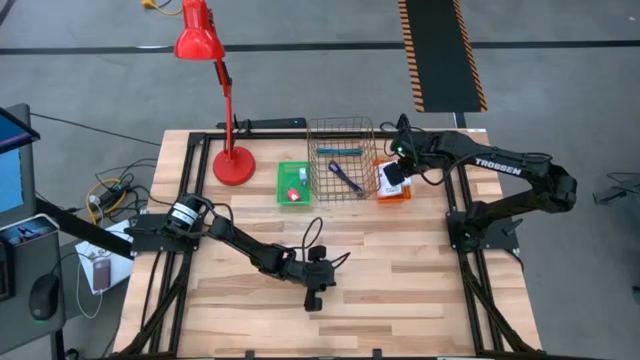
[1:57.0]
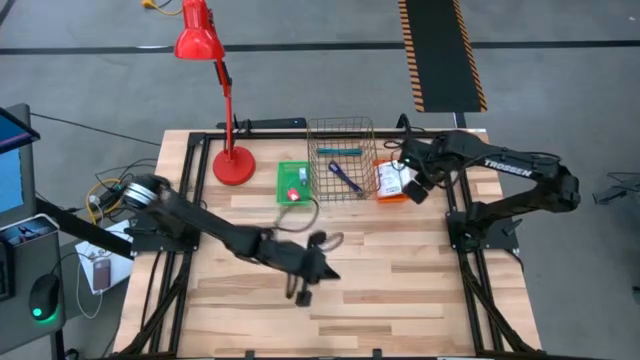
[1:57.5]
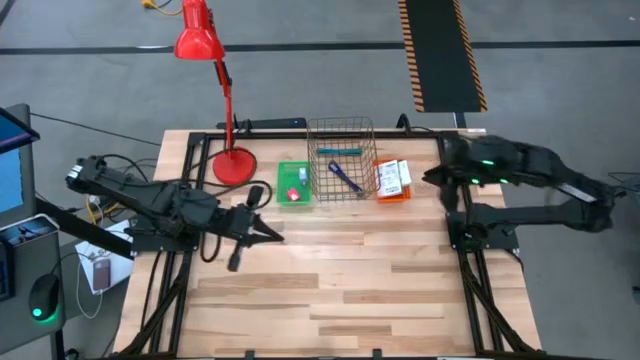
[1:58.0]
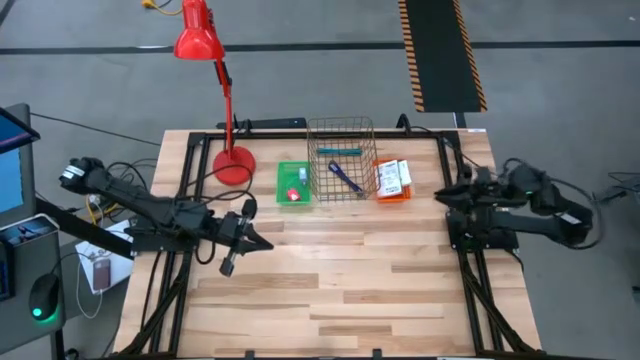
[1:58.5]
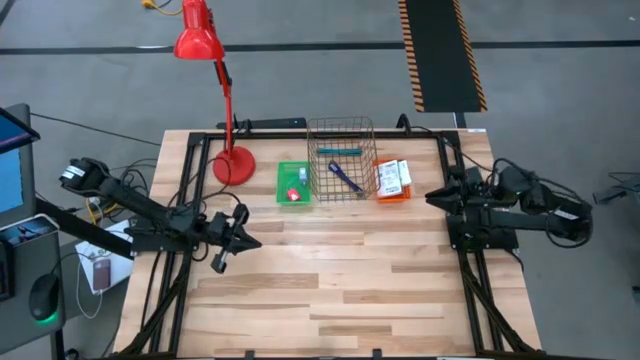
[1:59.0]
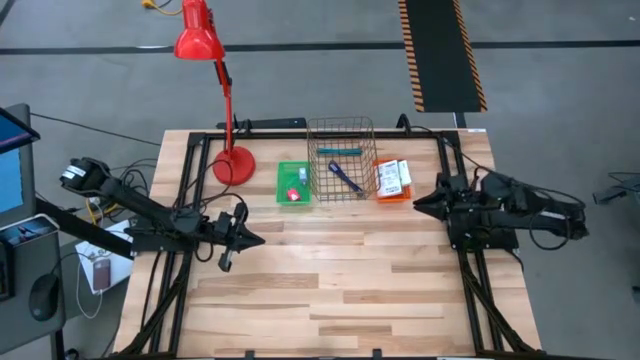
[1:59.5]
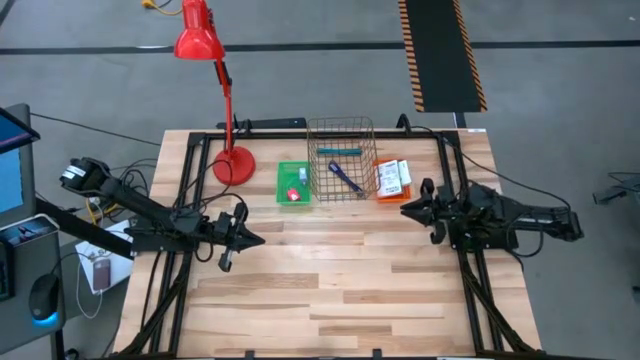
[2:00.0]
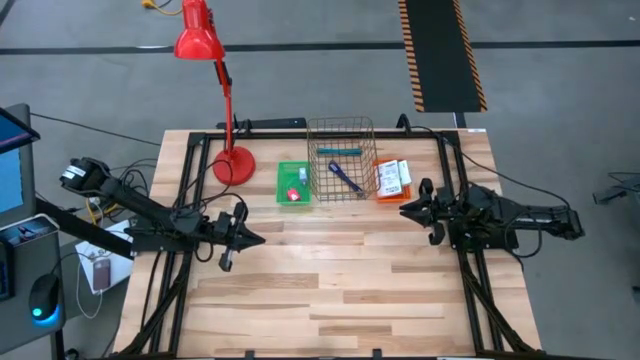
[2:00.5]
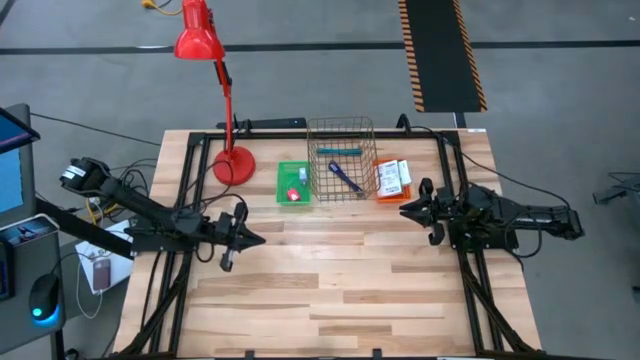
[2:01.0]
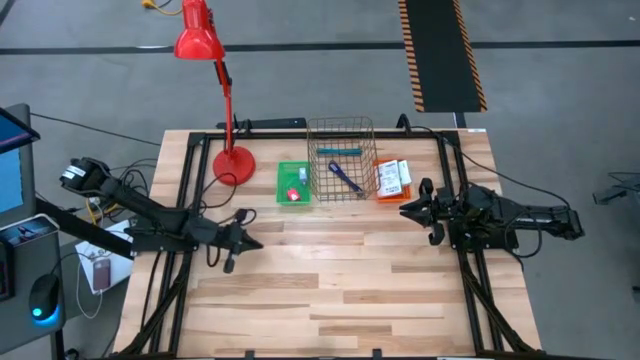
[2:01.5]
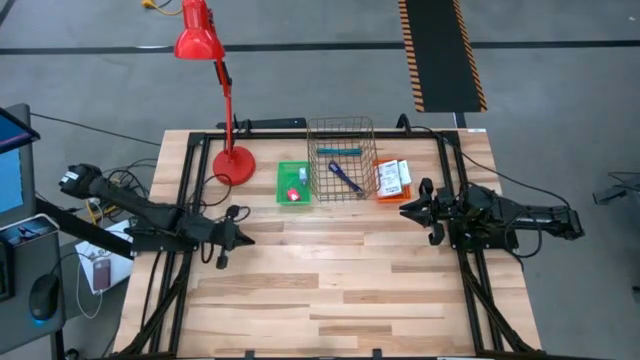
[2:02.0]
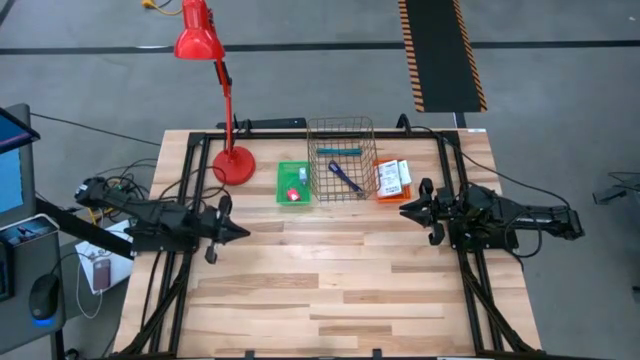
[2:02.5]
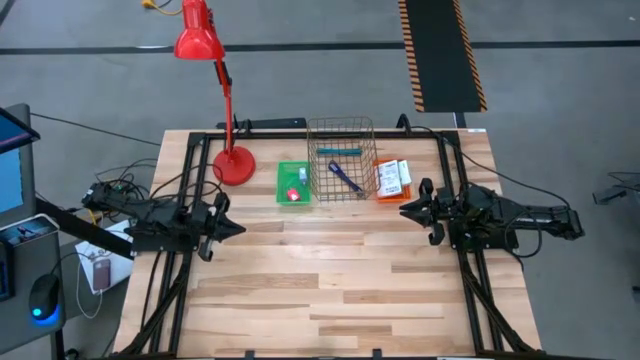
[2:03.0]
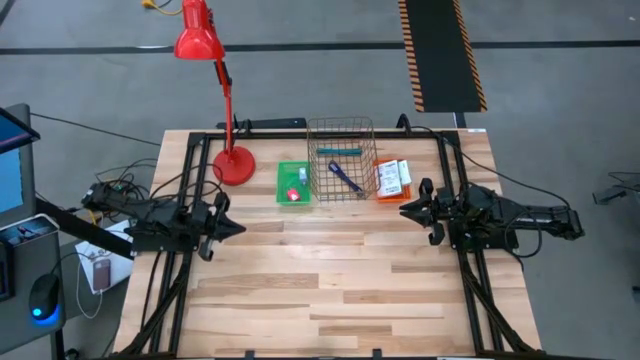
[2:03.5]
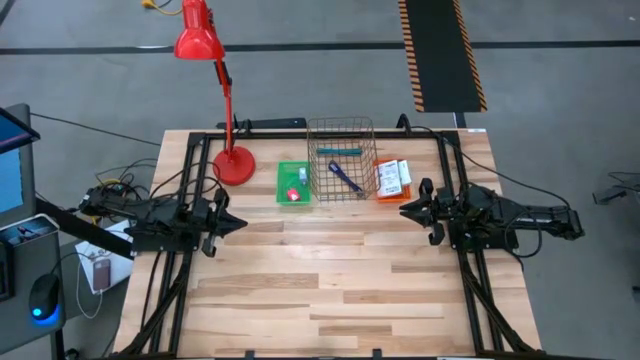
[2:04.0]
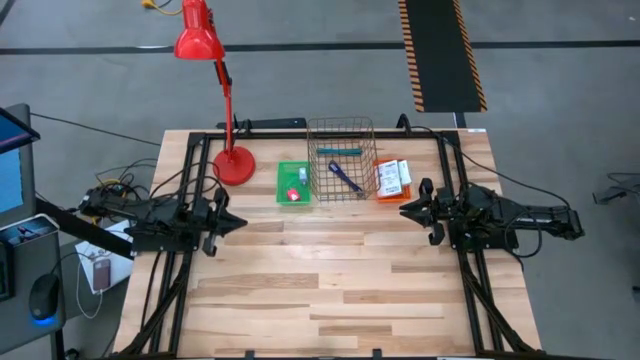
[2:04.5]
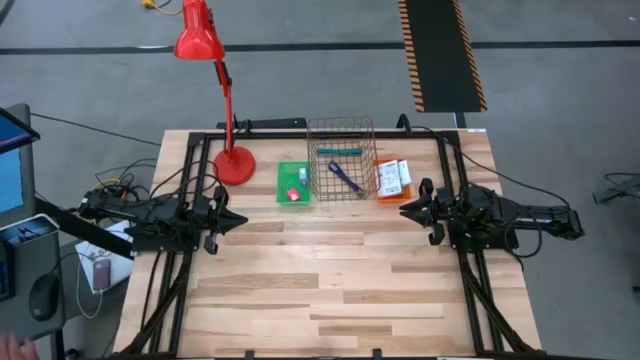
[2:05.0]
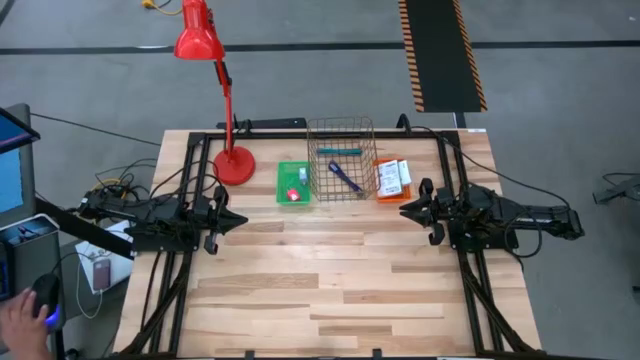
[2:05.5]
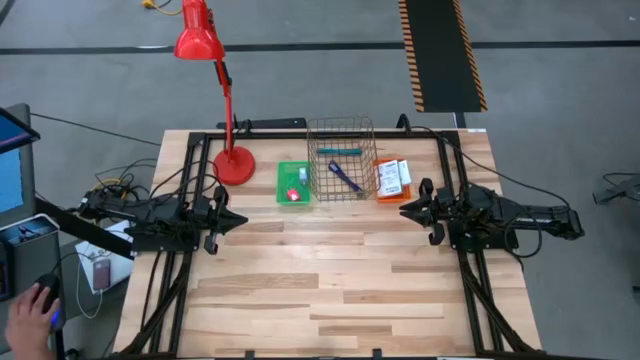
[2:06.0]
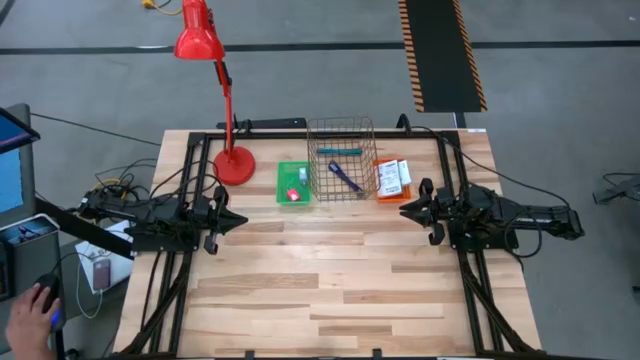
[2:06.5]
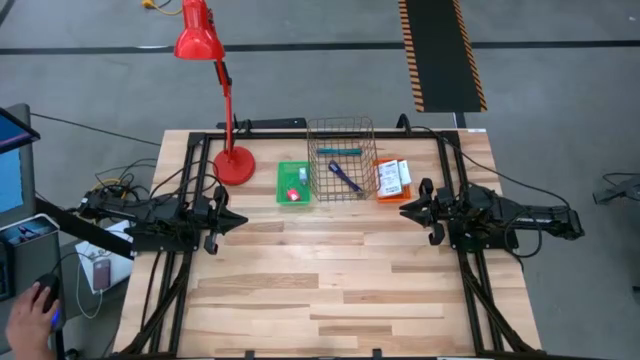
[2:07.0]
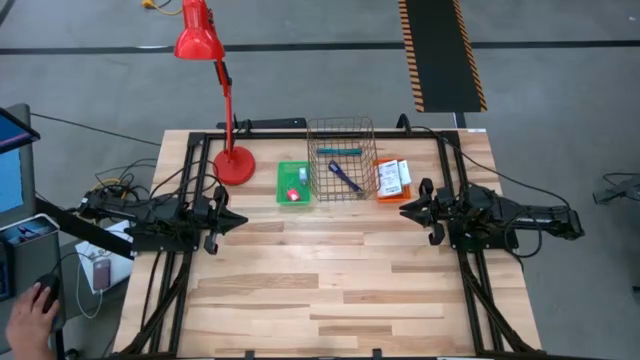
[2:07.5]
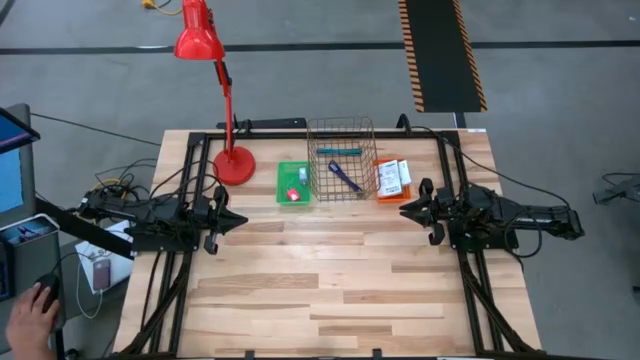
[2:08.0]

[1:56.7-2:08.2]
Task: Pick and place items into bin
Return to Home Position

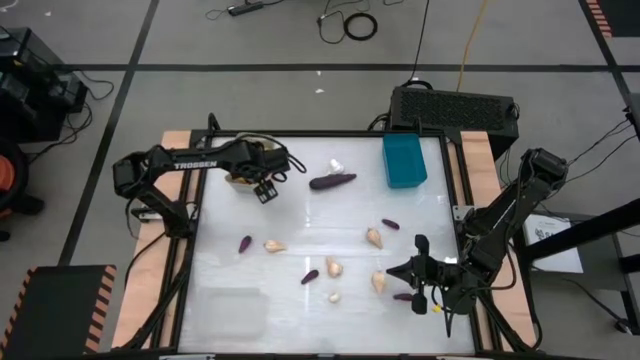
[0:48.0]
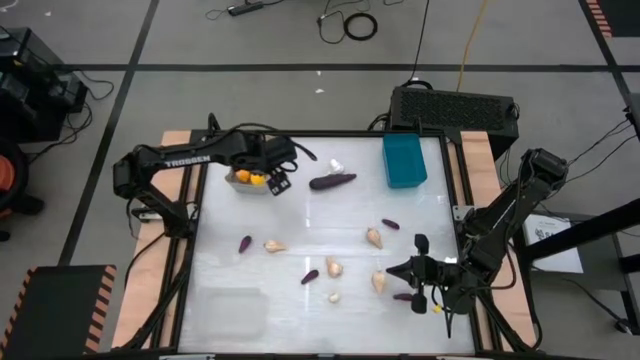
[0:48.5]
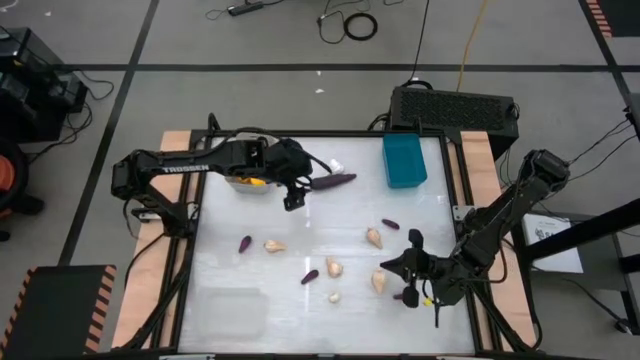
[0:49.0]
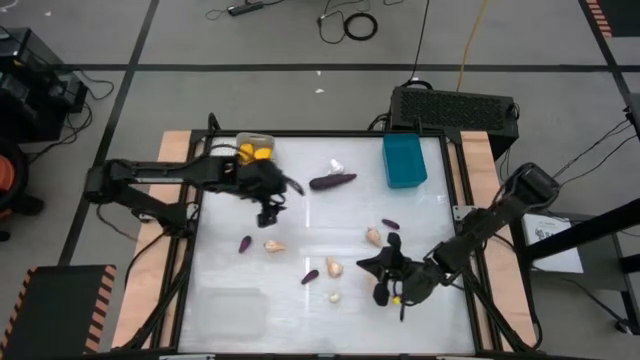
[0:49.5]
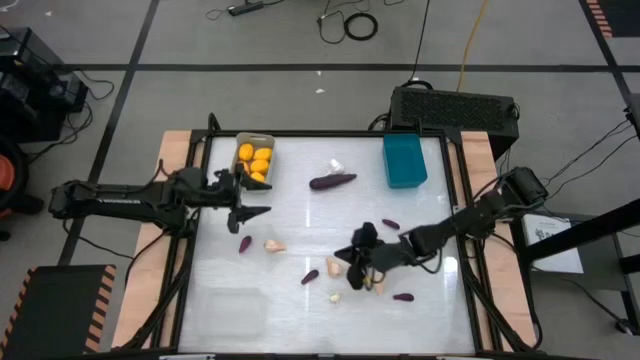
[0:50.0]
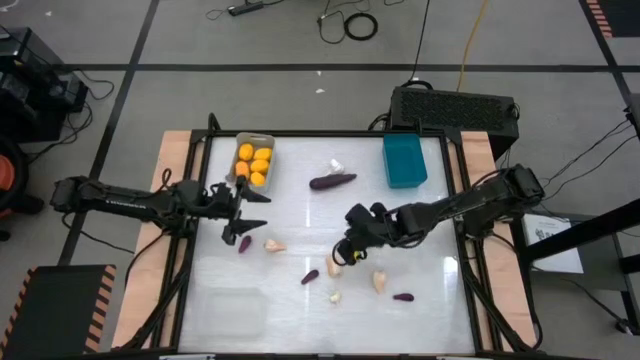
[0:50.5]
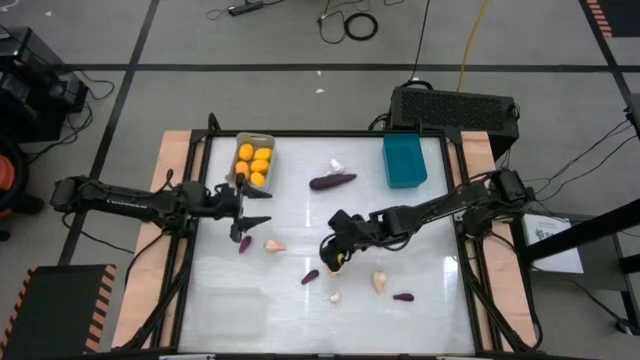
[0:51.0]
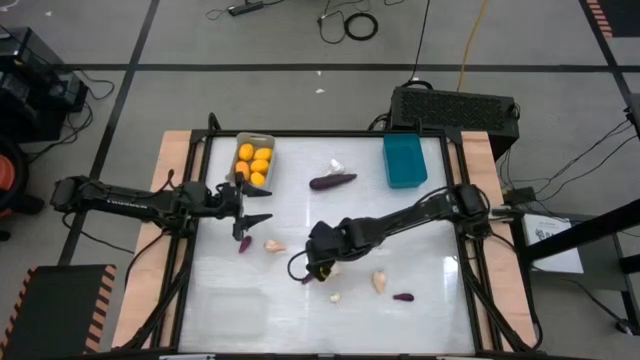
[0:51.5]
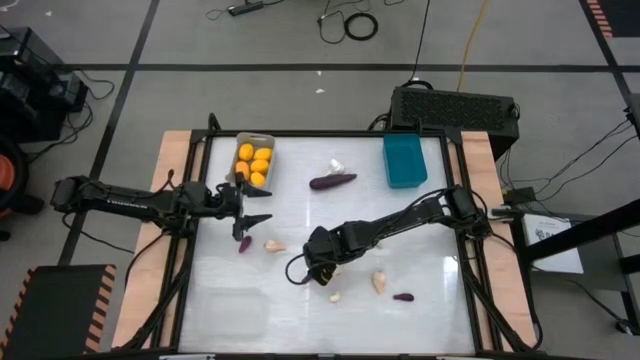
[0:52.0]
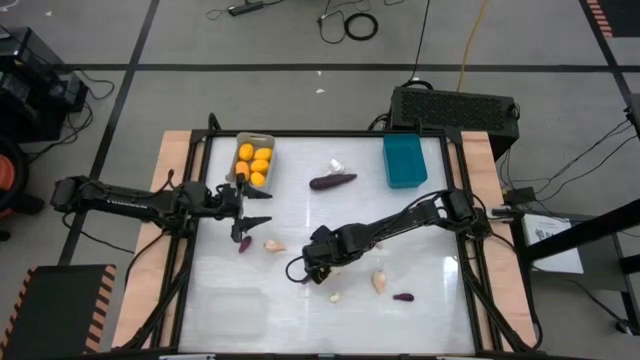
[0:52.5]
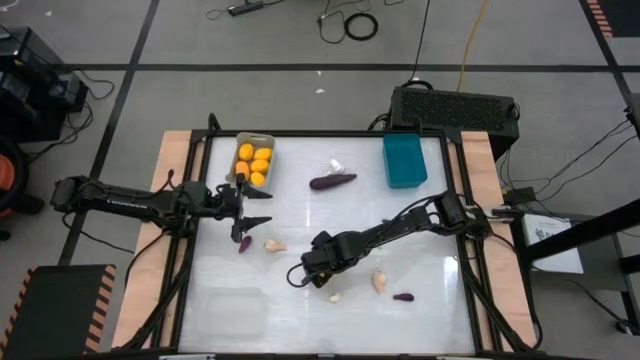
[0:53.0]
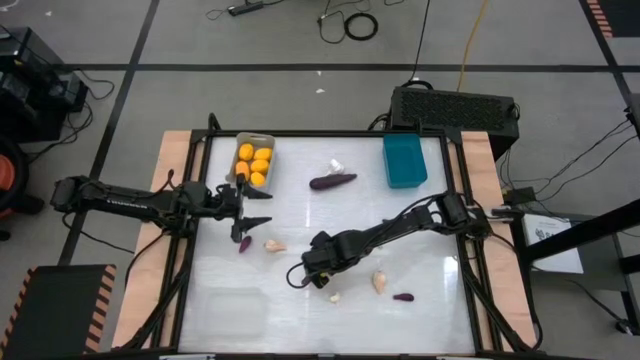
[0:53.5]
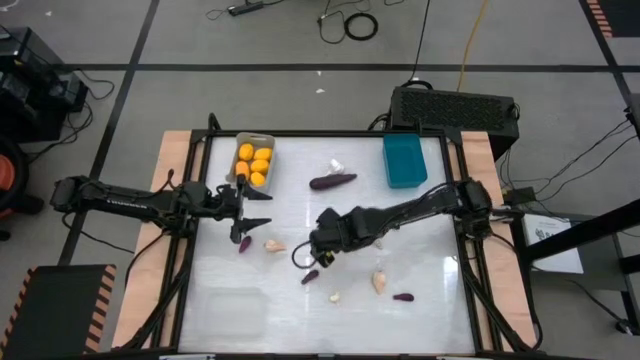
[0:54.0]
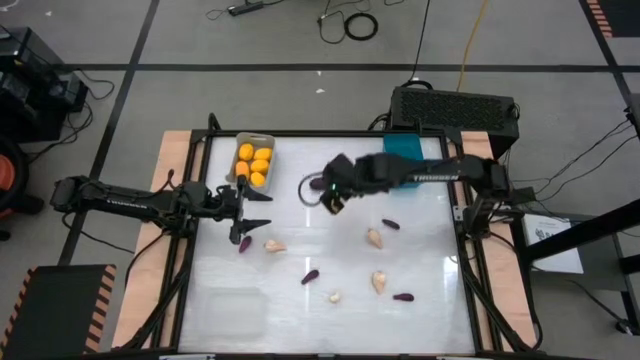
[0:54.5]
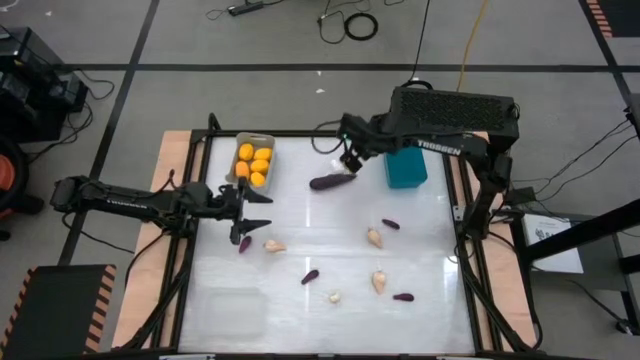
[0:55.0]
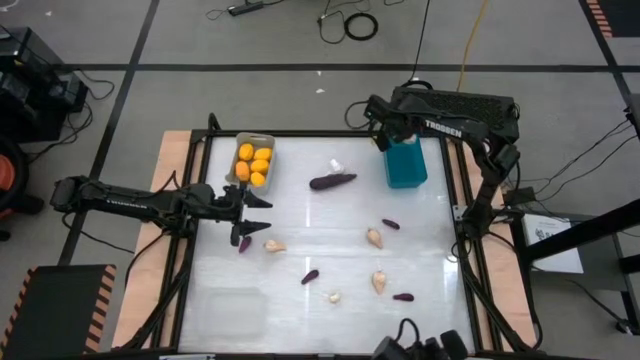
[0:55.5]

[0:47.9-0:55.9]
Task: Sort produce into baskets
Put the garlic into the blue bin

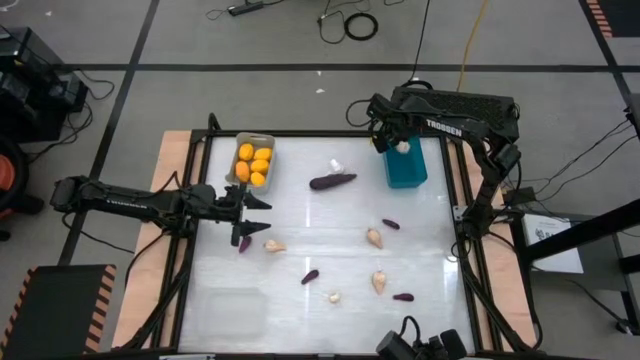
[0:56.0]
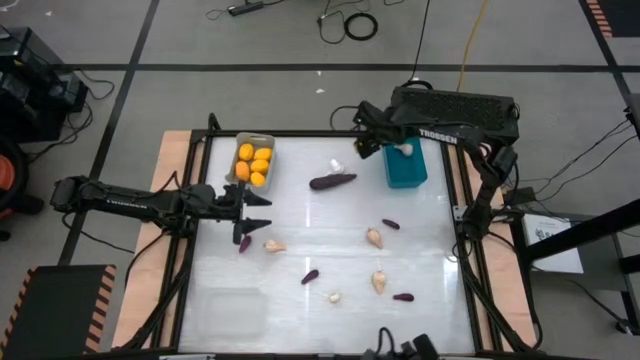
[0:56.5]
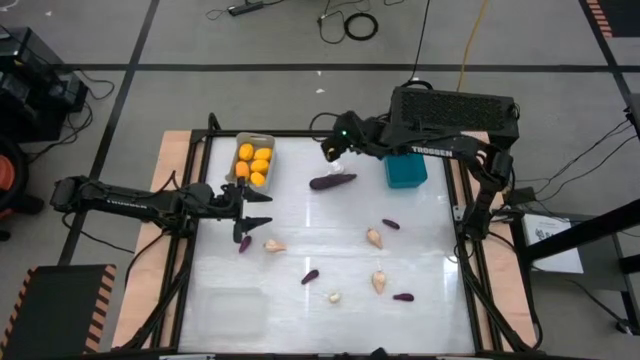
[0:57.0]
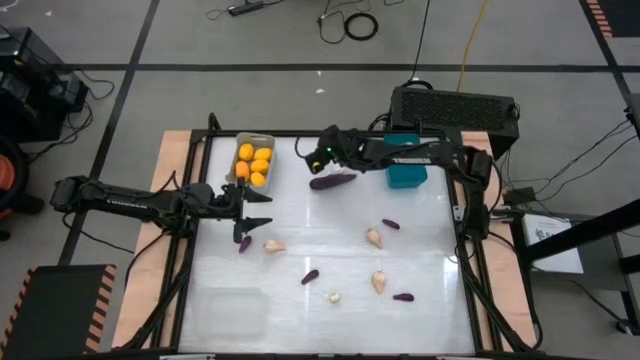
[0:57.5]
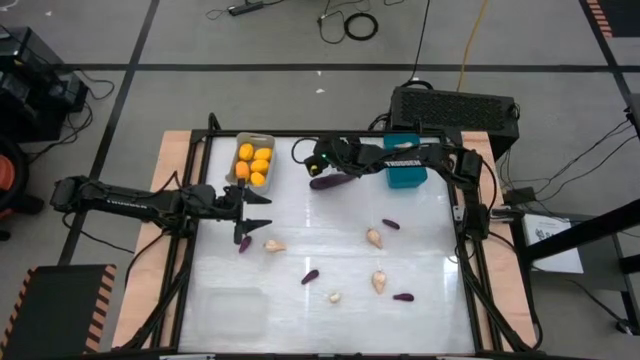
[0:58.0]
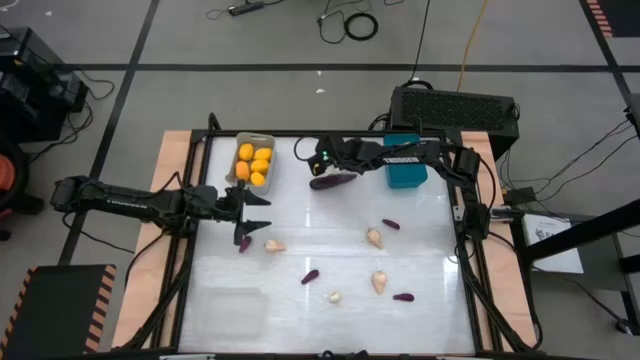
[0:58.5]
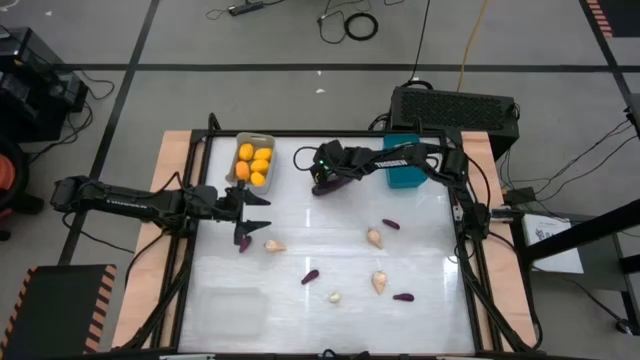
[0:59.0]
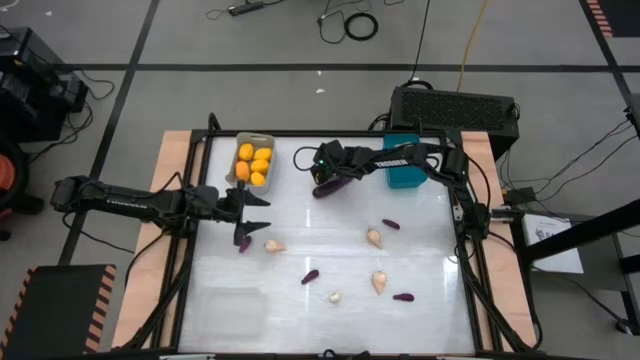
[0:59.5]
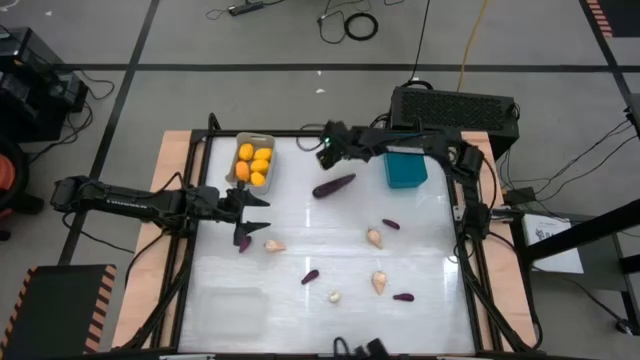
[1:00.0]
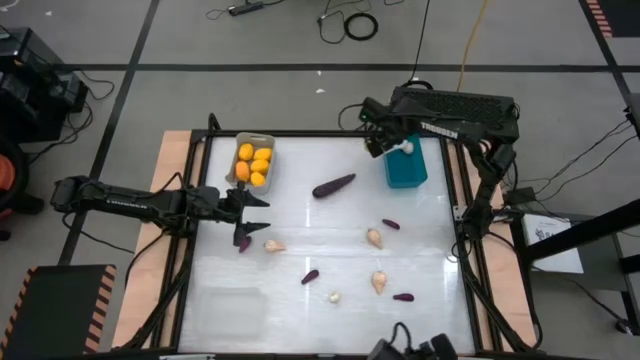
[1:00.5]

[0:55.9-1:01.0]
Put the garlic into the blue bin
